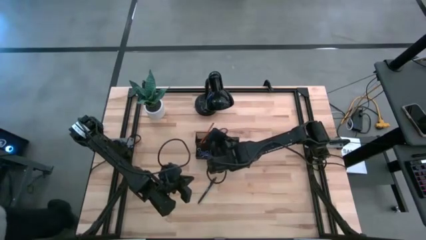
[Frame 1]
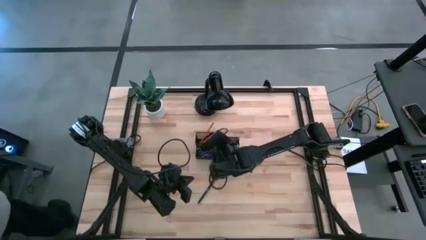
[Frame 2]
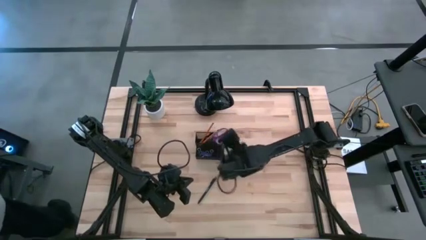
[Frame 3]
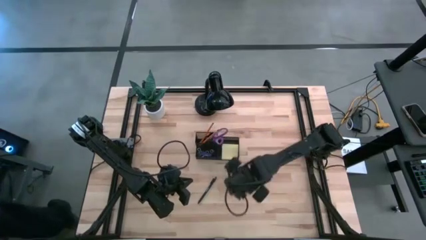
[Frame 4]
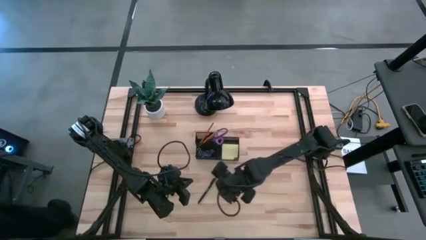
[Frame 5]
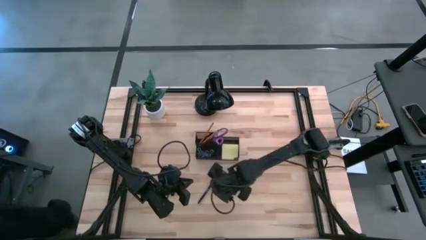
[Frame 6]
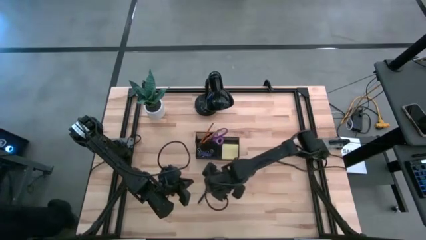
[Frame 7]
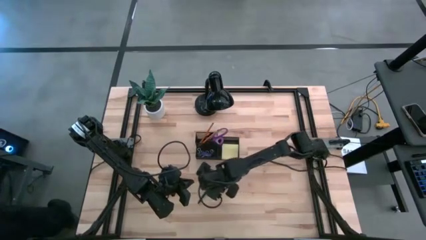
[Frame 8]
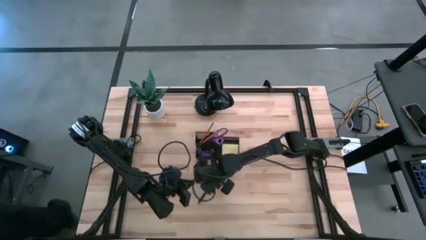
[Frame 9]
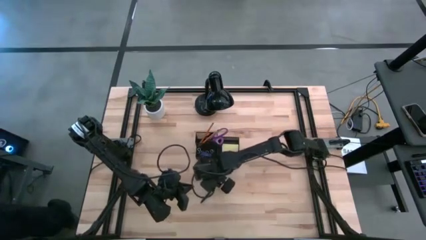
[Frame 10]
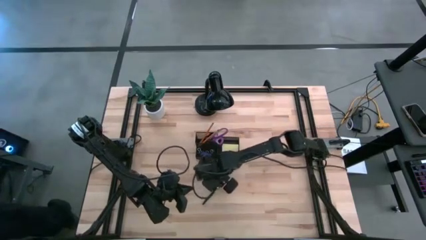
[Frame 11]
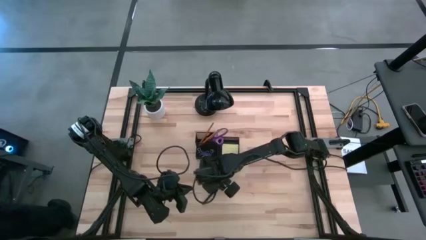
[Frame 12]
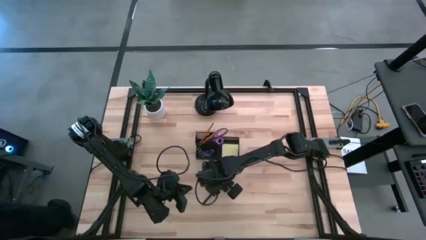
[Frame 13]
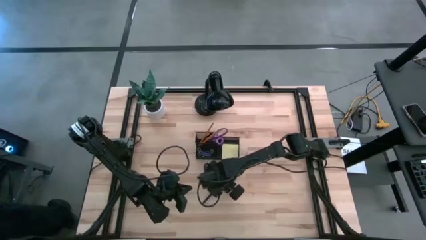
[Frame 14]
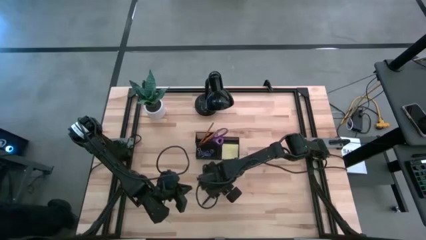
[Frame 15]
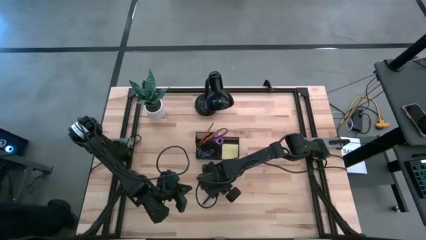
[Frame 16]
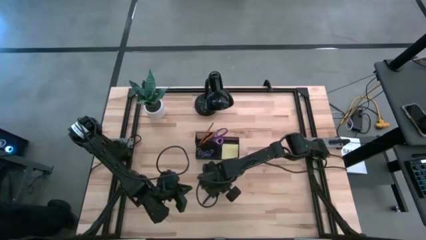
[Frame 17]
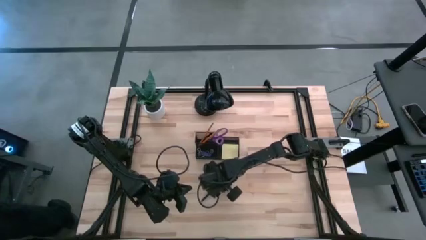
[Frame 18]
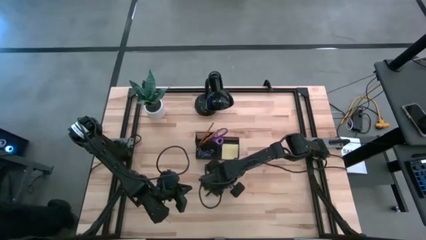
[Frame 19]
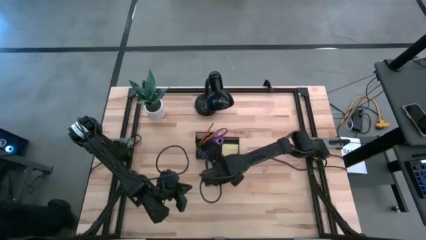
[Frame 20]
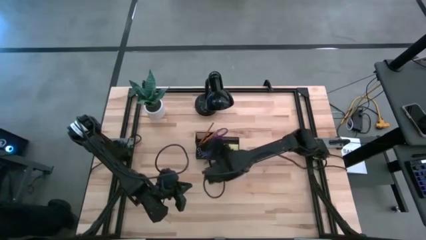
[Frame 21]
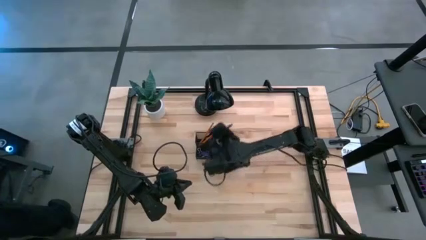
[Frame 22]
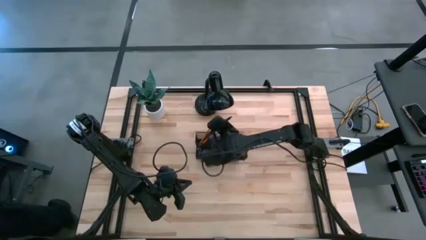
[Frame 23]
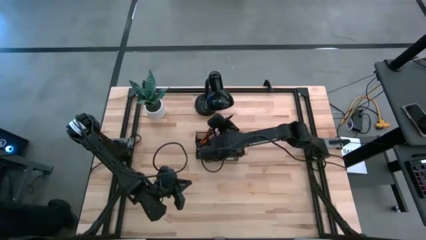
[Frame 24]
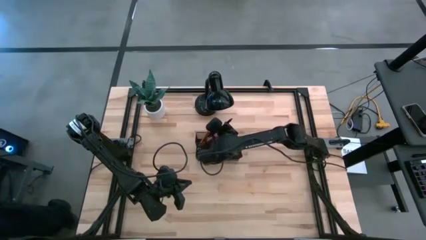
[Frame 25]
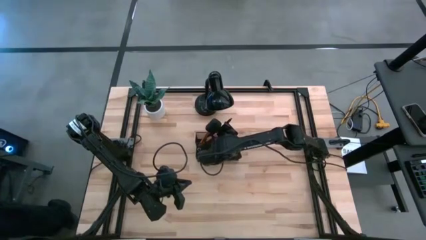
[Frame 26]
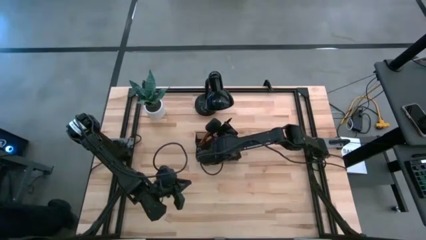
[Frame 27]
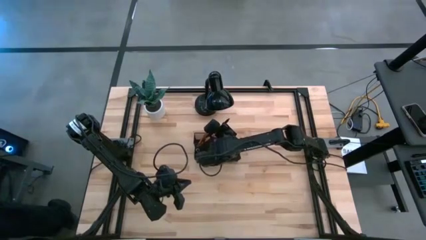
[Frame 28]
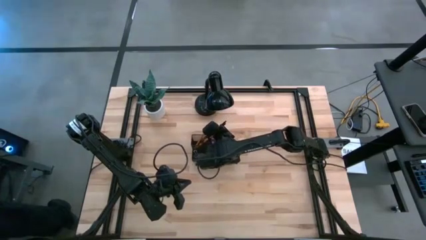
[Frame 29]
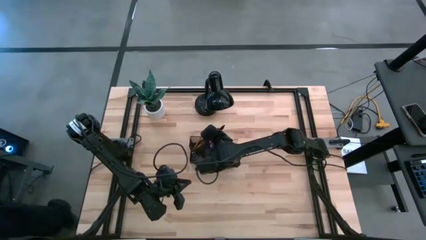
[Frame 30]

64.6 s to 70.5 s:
Task: Pick and place office supplies into organizer
Put the black pen into the black desk organizer

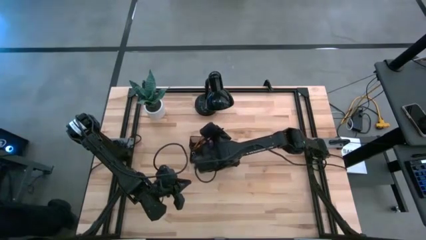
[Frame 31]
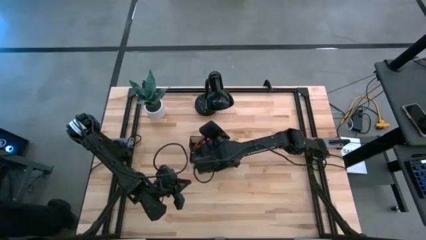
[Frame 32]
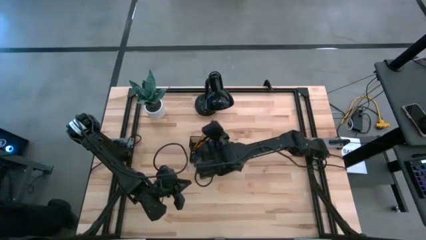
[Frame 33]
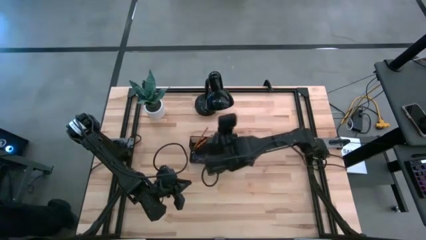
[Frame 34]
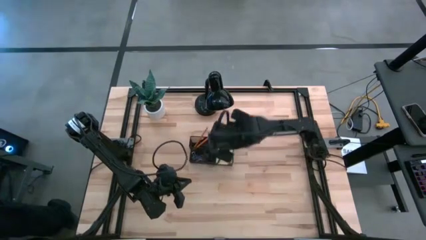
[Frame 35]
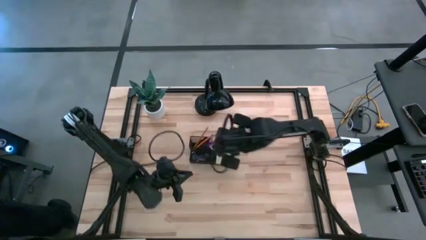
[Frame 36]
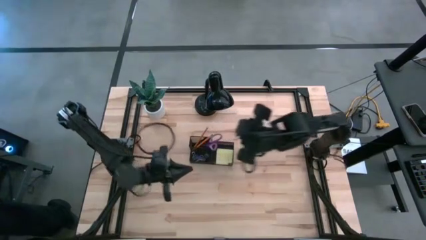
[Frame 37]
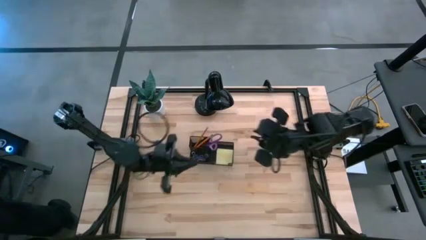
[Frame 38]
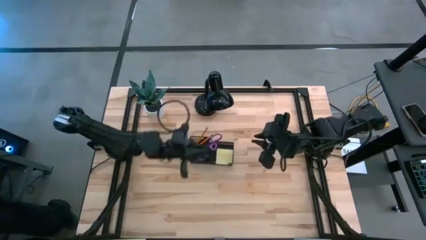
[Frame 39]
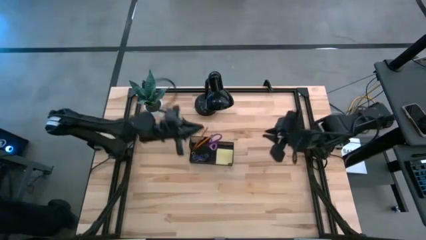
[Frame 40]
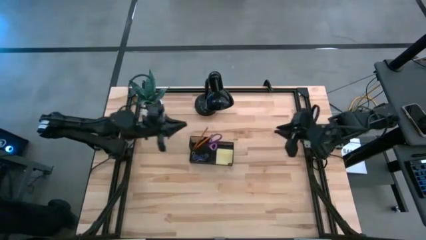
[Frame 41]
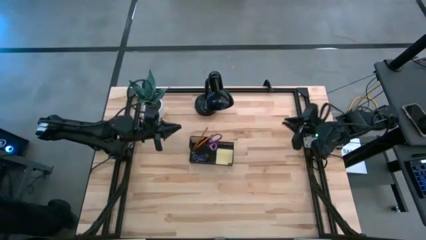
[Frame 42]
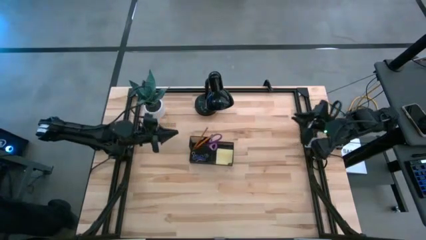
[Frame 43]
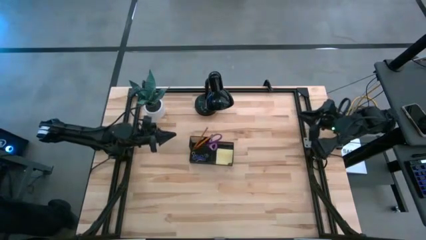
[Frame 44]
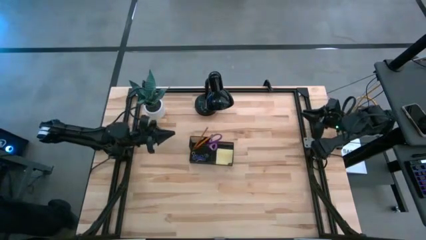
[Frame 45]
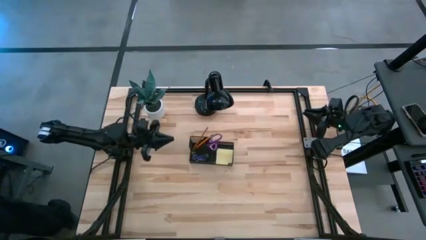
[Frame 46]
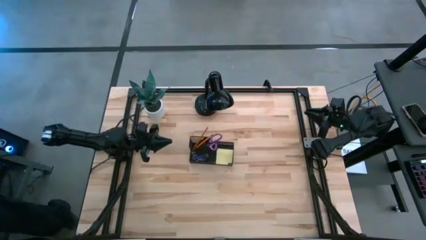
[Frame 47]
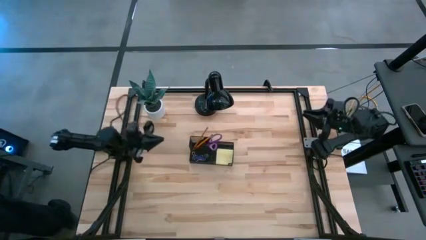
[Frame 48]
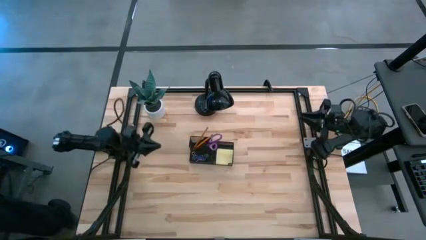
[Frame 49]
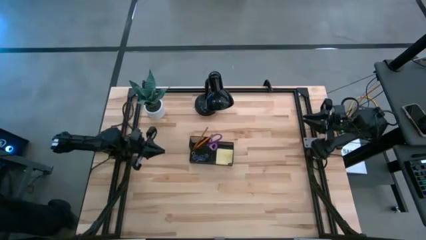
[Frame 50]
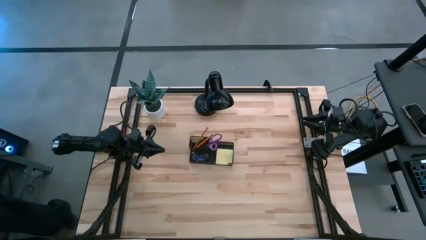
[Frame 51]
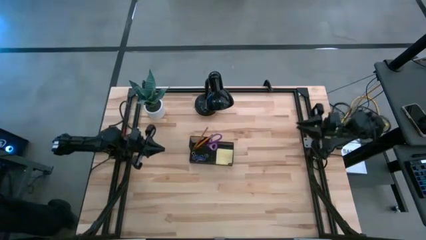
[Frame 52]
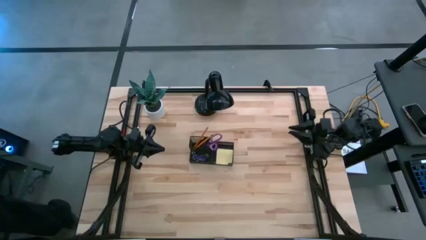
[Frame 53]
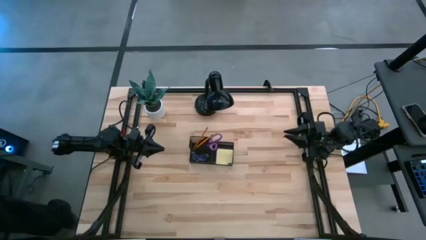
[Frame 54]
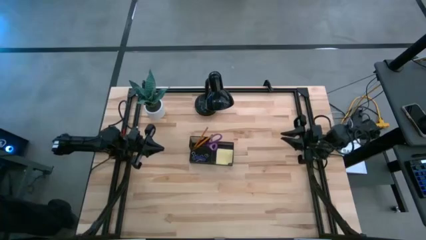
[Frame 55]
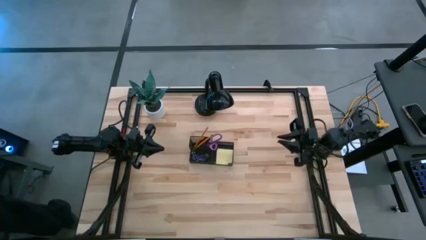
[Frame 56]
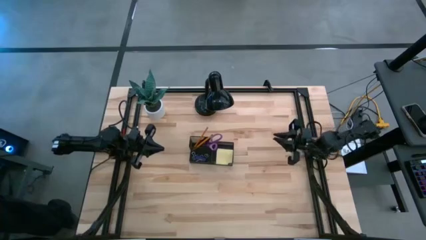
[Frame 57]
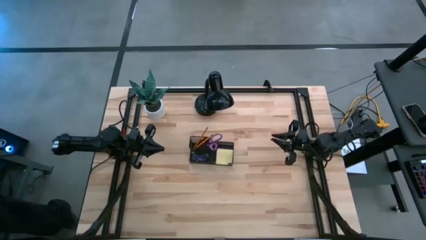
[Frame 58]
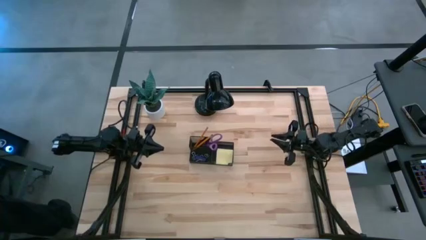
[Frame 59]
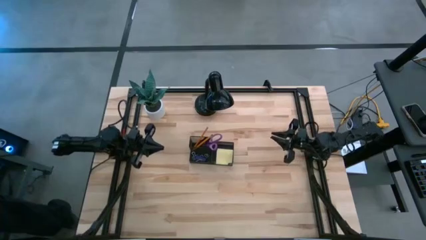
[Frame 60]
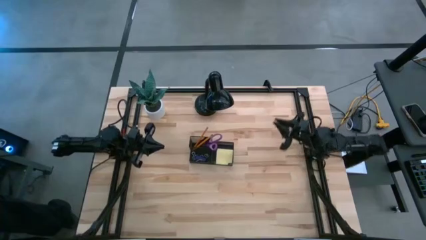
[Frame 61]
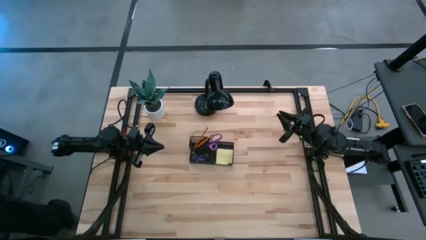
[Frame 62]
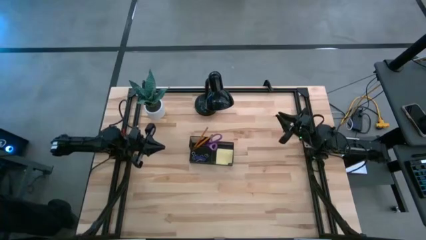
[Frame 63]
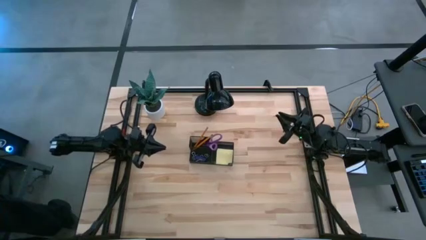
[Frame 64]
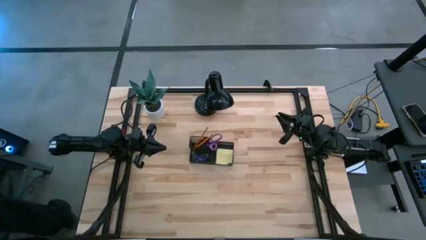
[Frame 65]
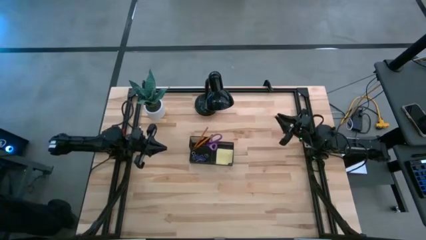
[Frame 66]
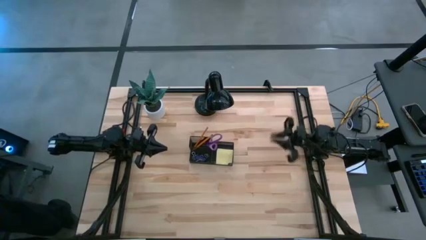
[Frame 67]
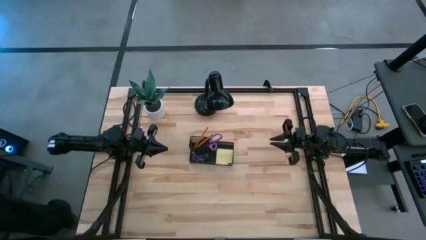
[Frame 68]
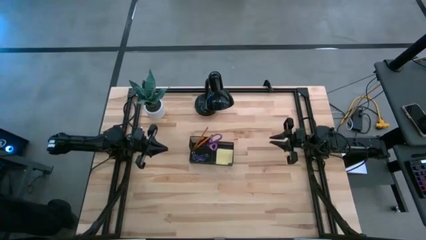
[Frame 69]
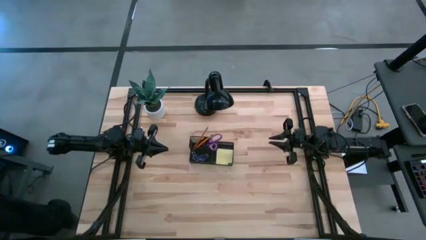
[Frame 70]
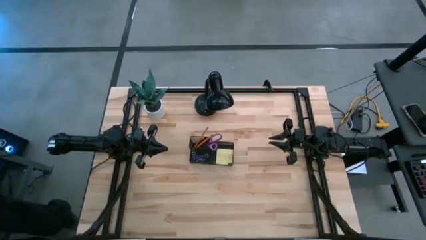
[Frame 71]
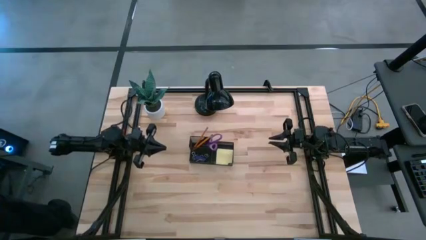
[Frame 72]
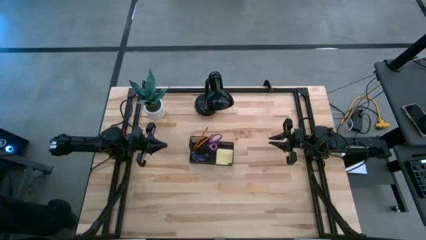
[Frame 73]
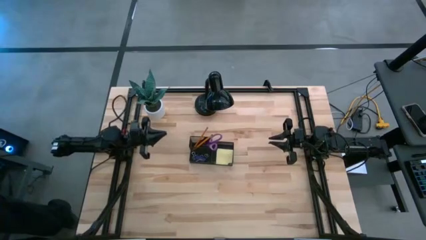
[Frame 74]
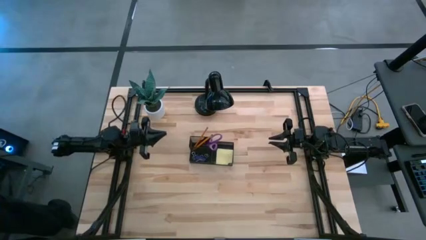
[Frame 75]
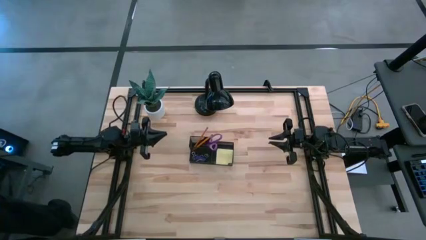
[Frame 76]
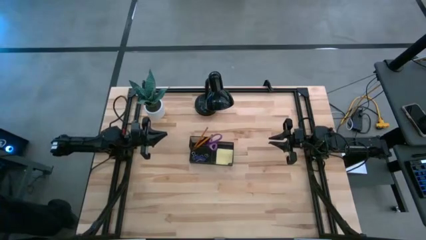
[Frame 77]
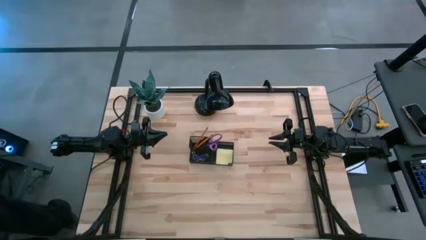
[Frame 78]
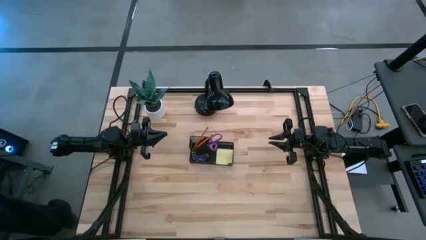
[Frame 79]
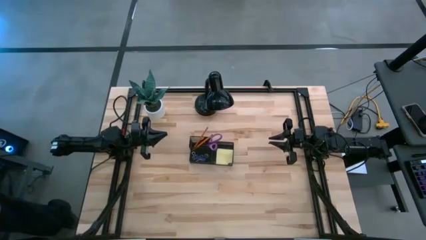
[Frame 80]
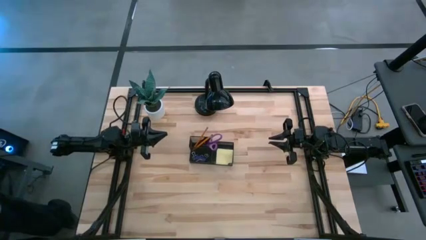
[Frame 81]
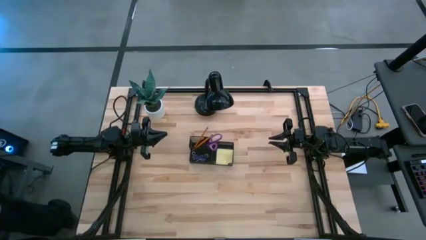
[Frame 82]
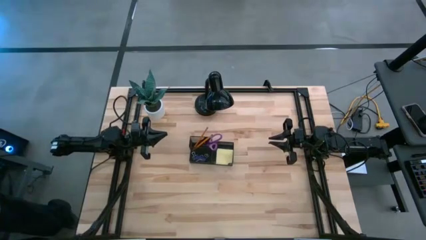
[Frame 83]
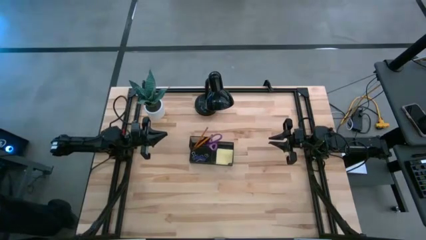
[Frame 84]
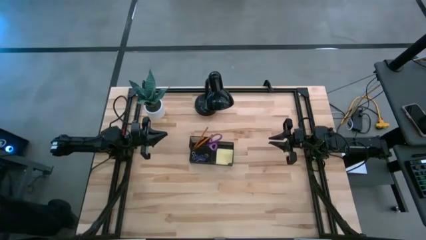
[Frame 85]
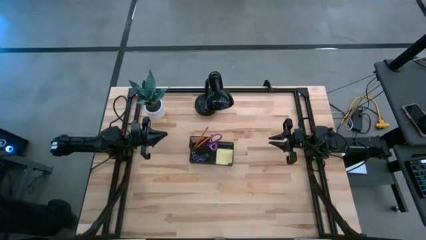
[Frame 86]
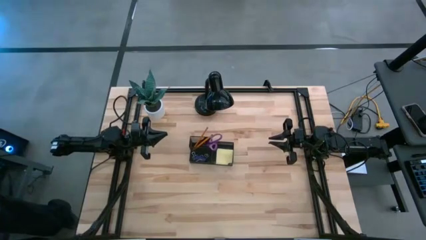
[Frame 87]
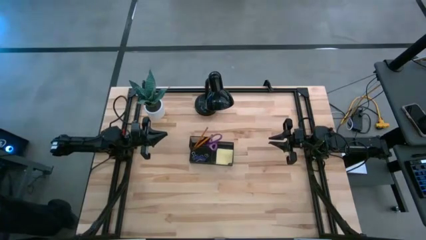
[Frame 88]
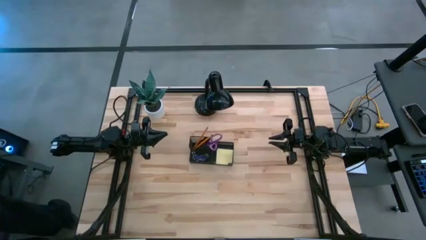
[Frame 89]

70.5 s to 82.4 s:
Return to Home Position

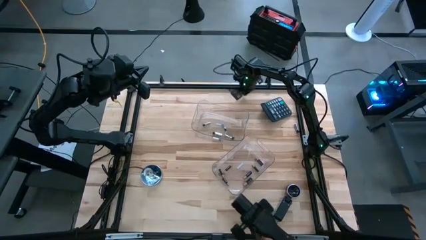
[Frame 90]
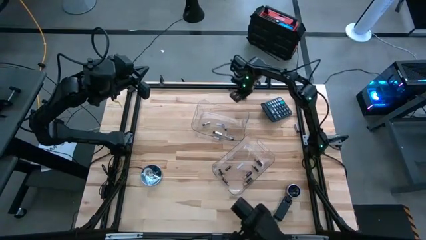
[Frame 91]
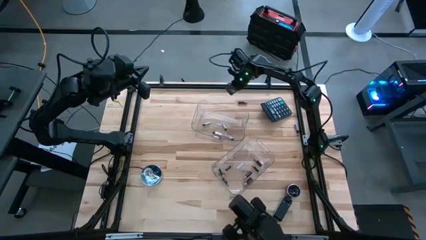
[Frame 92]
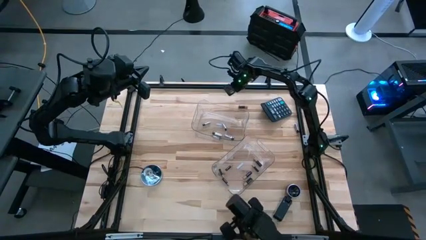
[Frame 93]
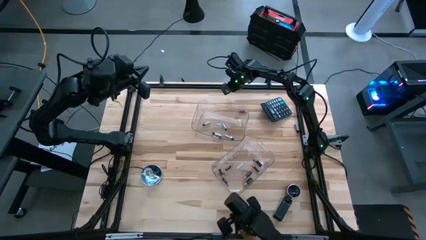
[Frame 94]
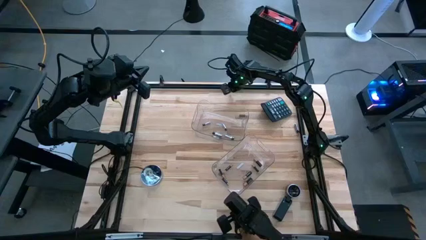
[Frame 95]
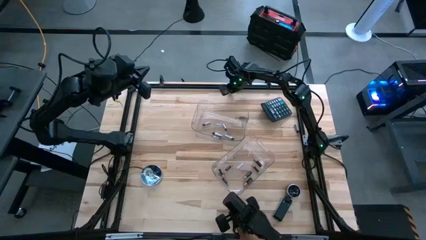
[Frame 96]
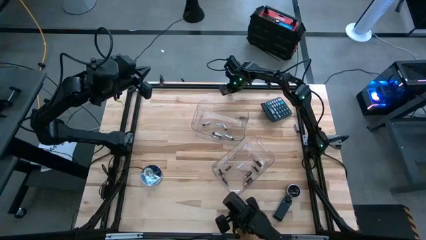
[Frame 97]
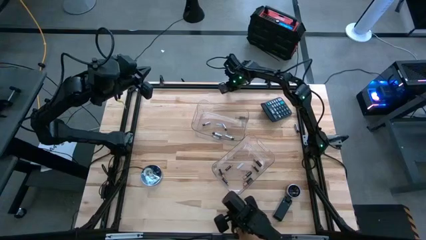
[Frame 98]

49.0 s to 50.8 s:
Task: Sort batteries
Adjust the top transparent bin
